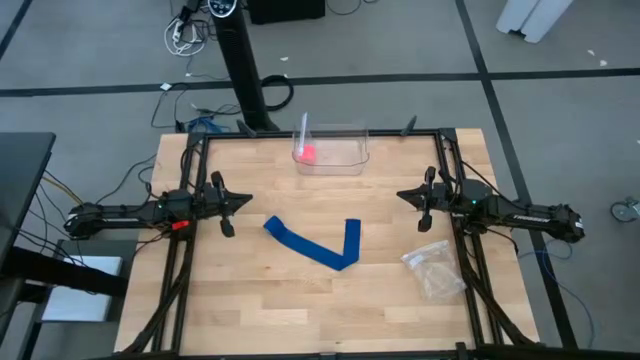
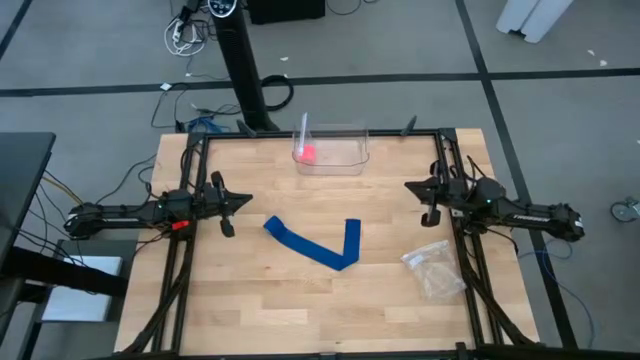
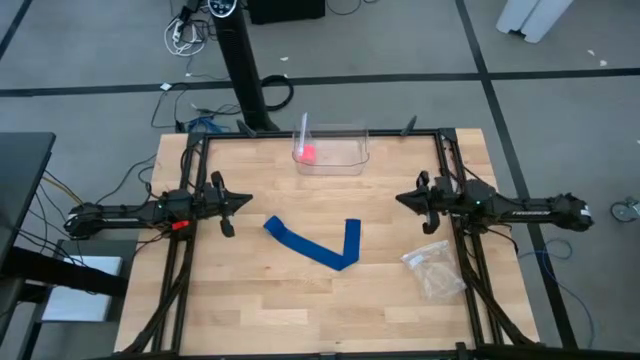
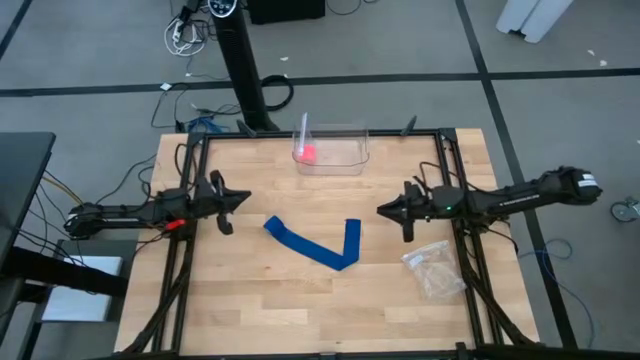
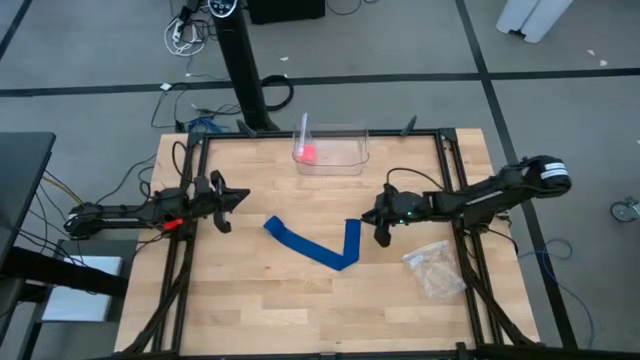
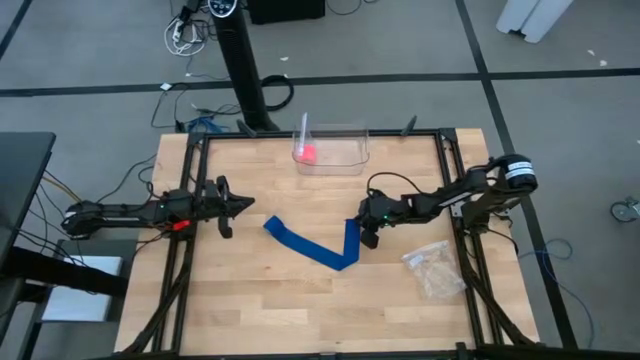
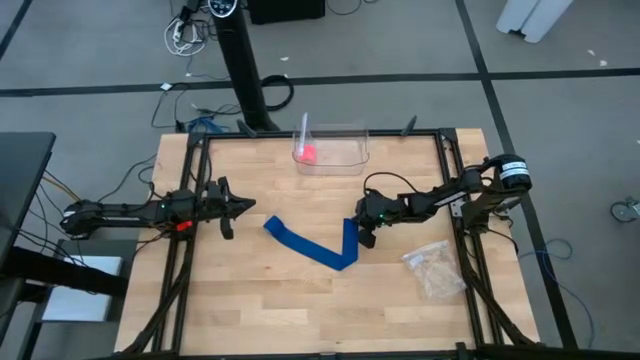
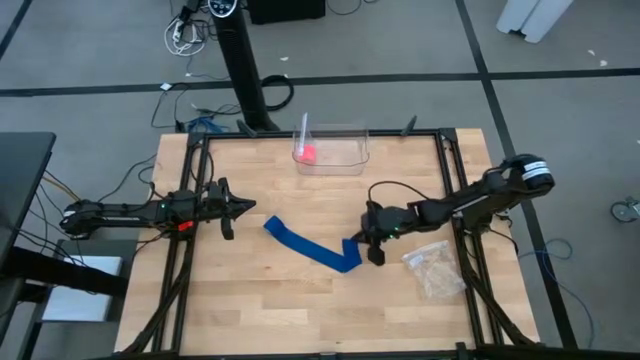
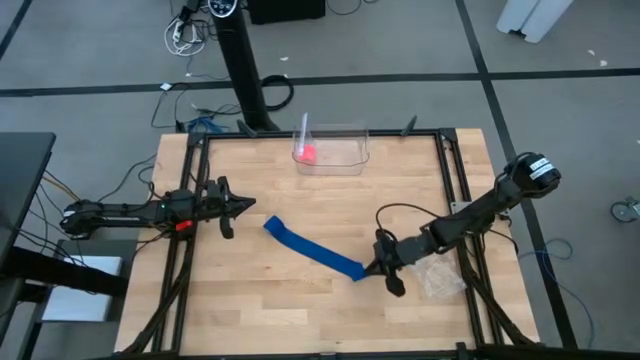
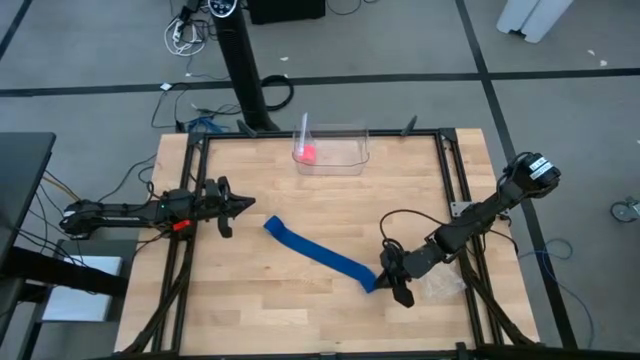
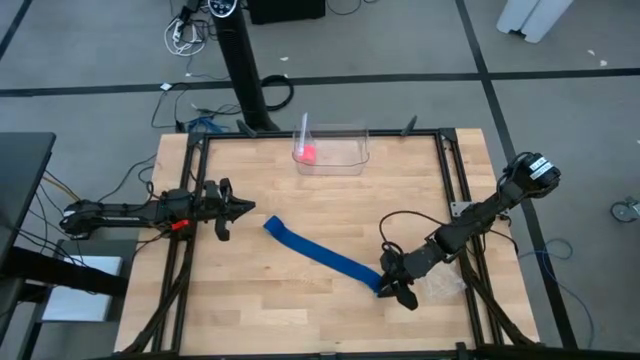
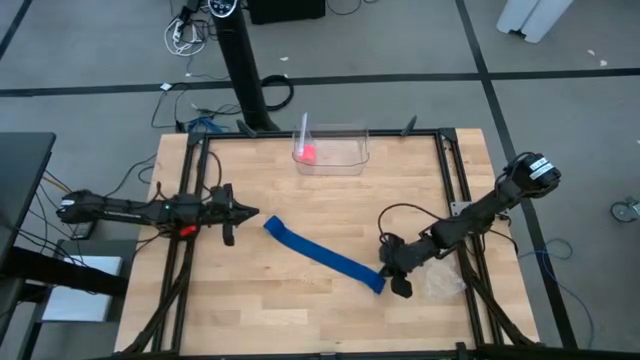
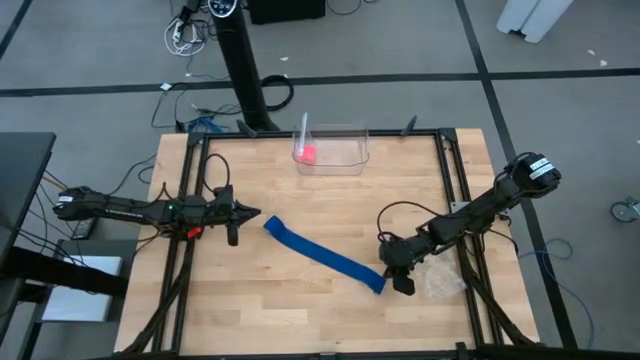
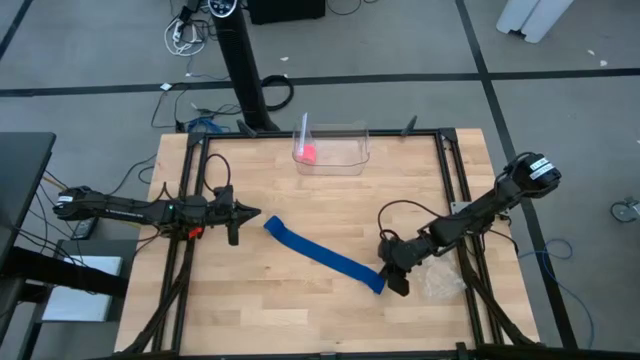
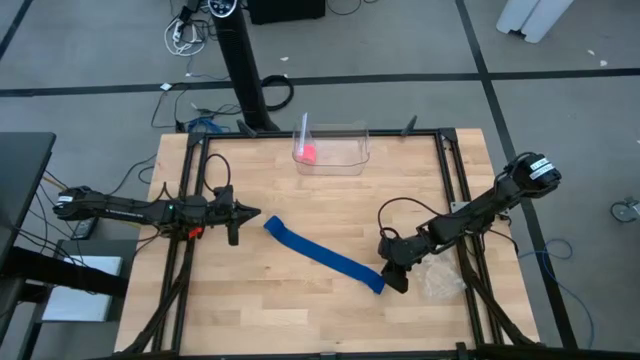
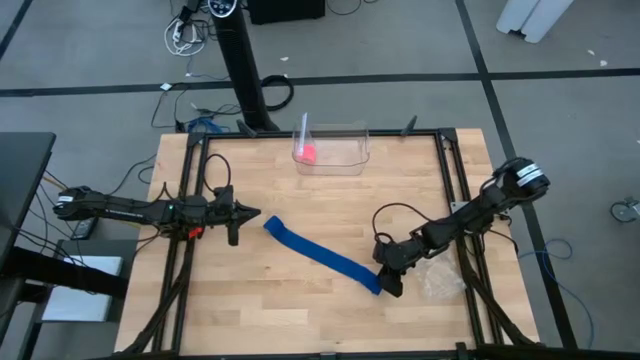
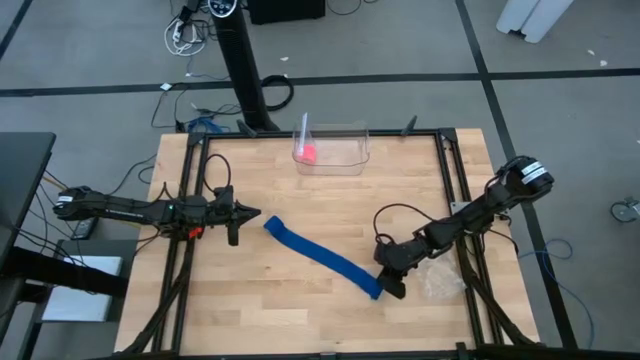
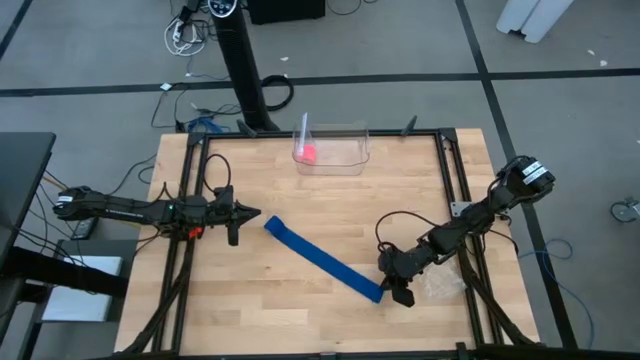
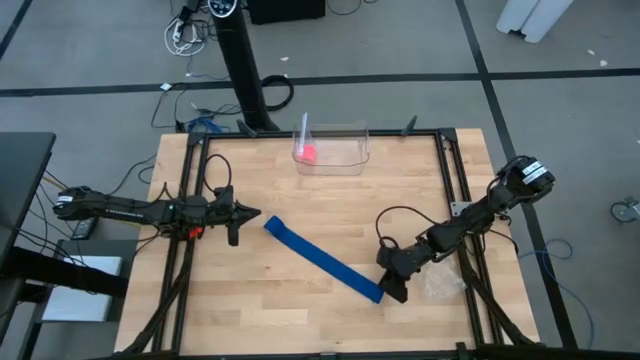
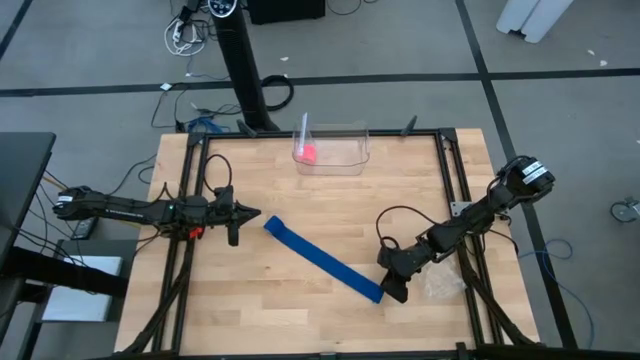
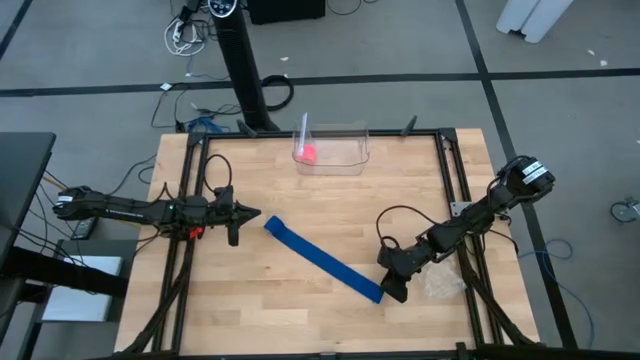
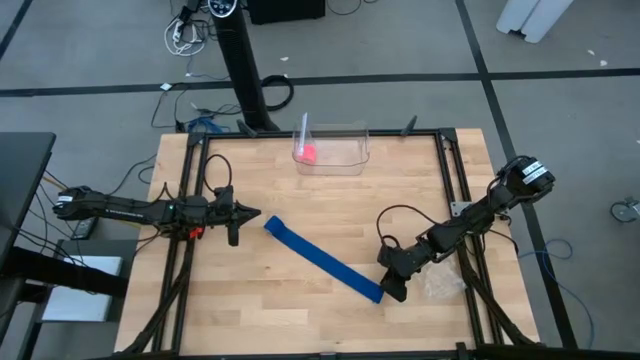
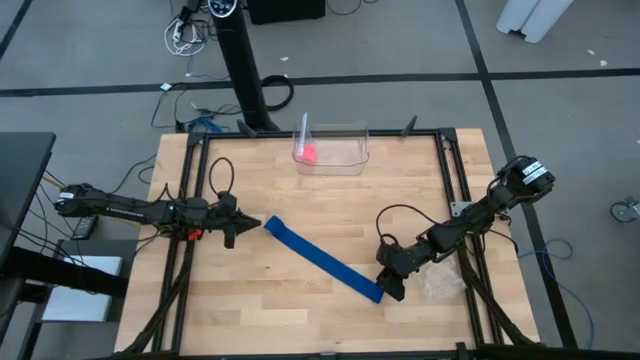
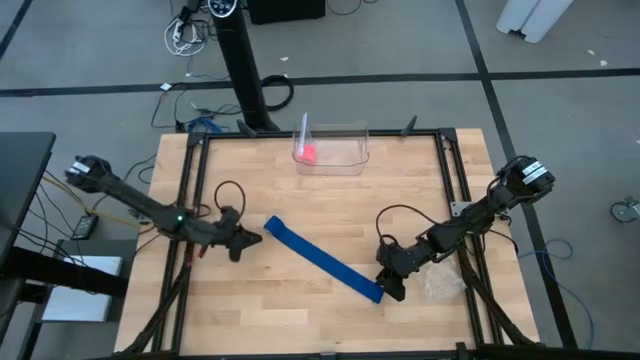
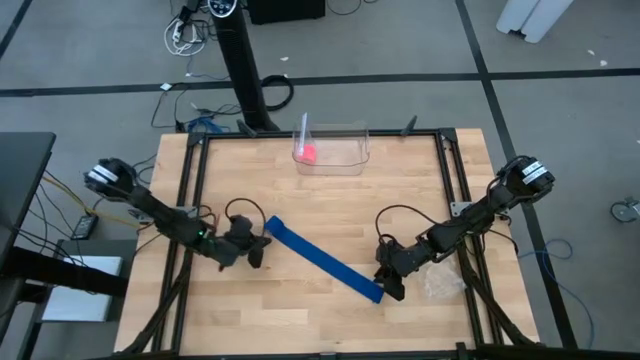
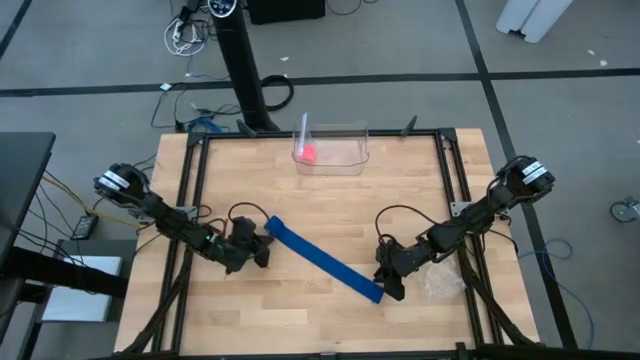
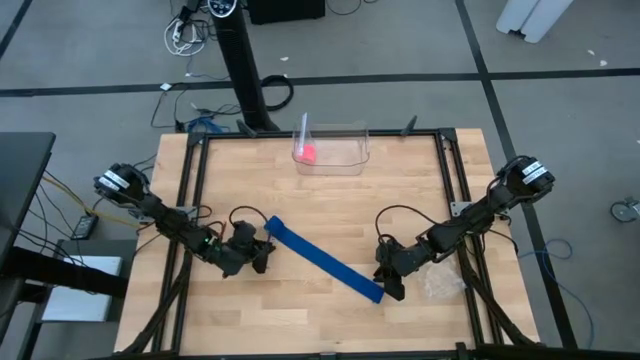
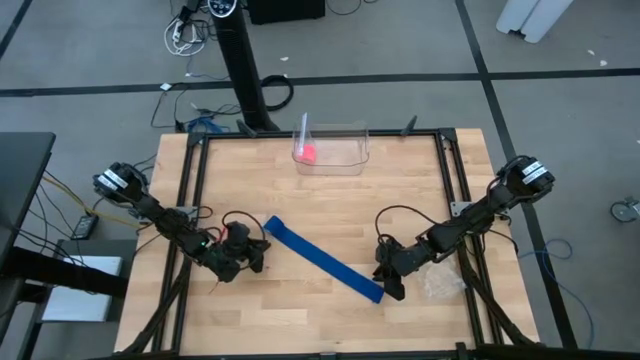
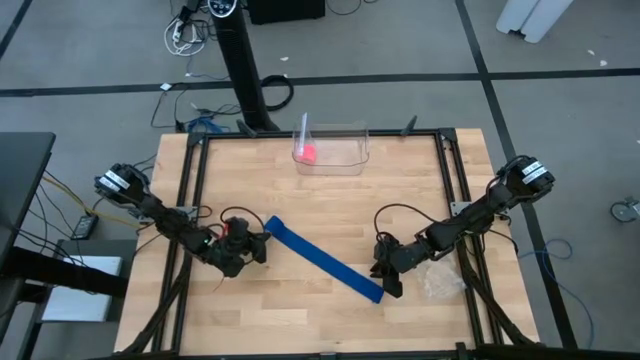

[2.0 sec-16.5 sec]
Task: Roll bandage
Roll the blue bandage

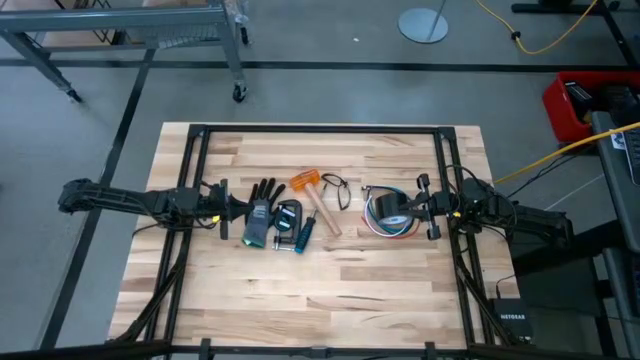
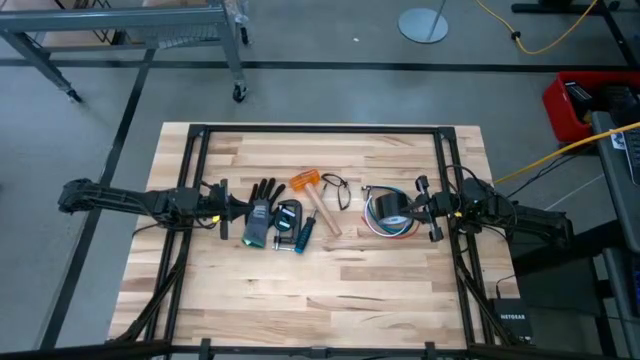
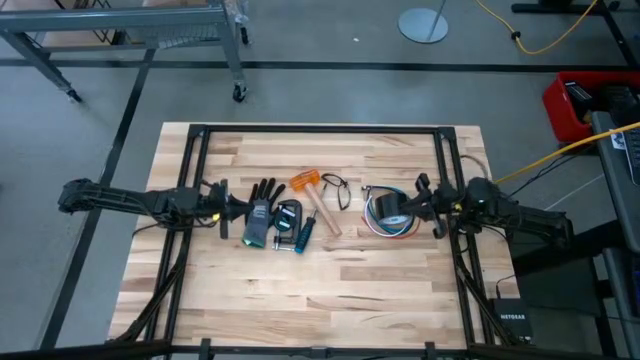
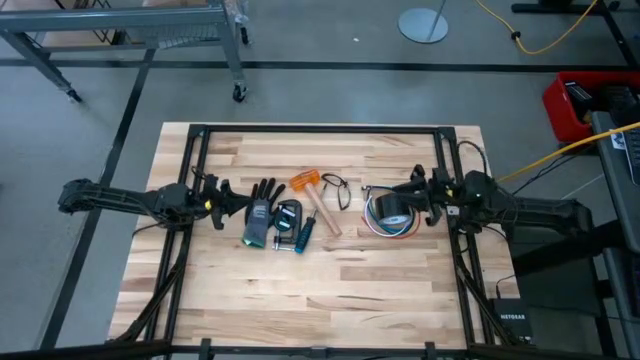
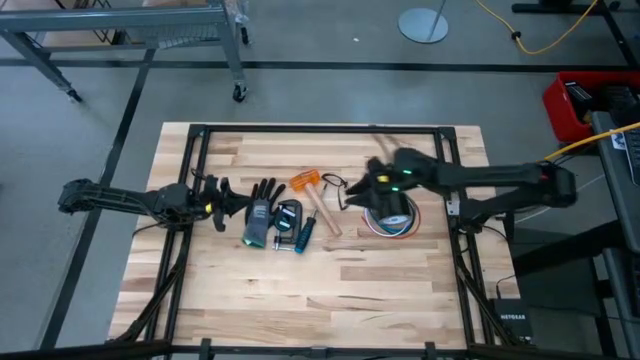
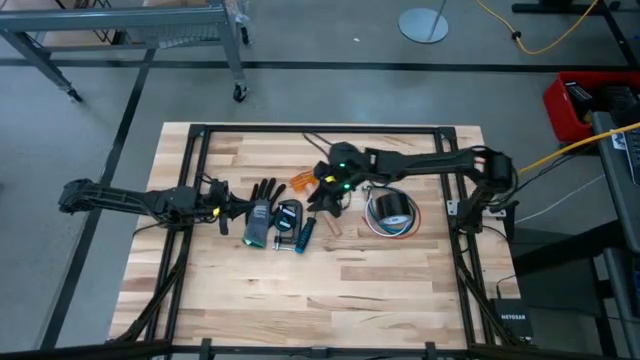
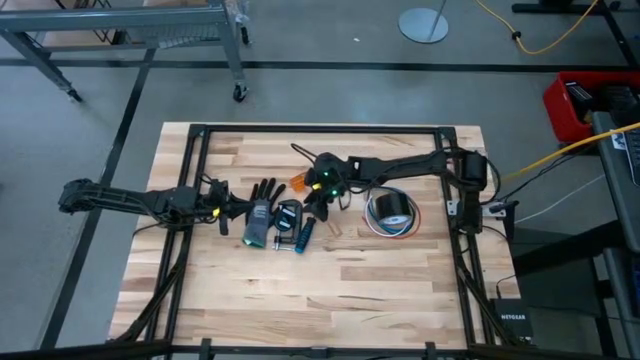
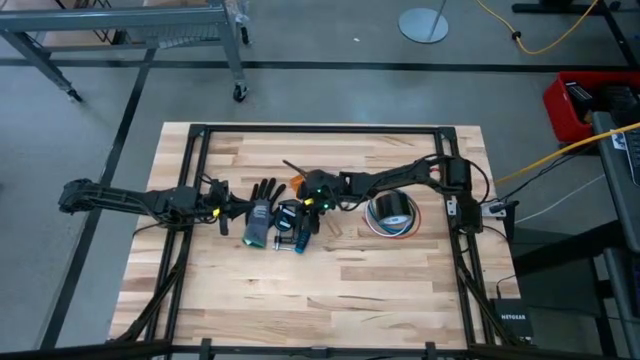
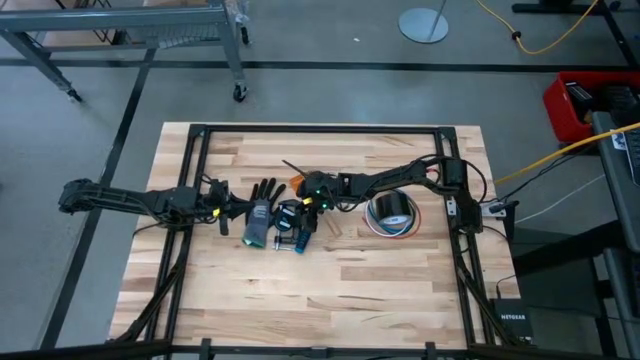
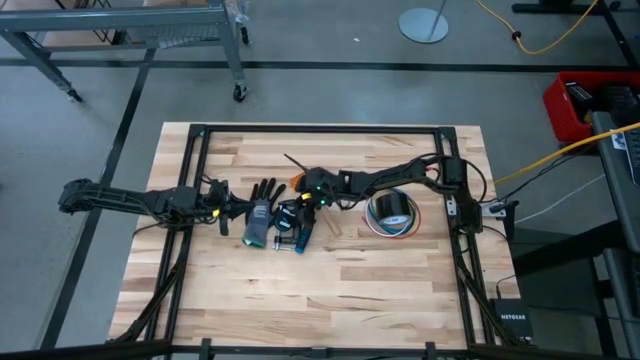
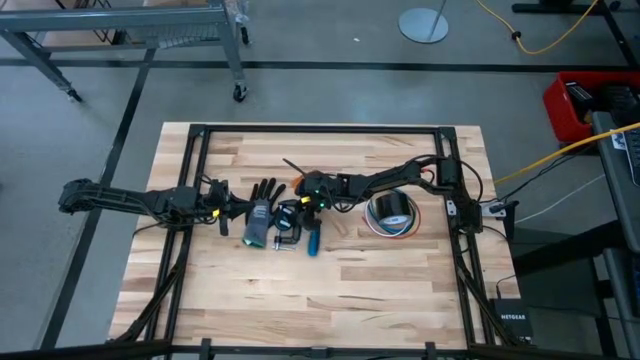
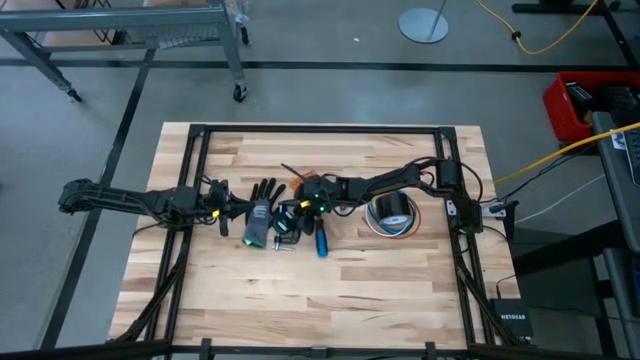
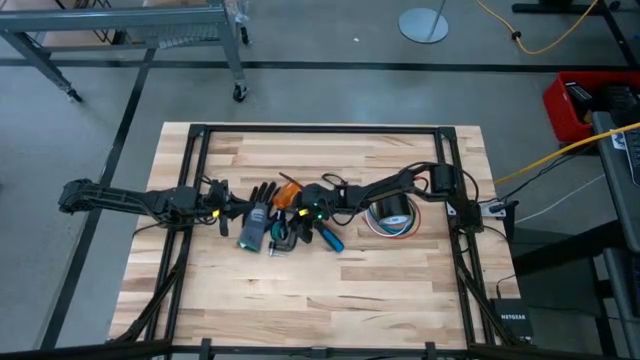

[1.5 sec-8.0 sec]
Task: Coil cords
Uncoil the green wire from the spool
